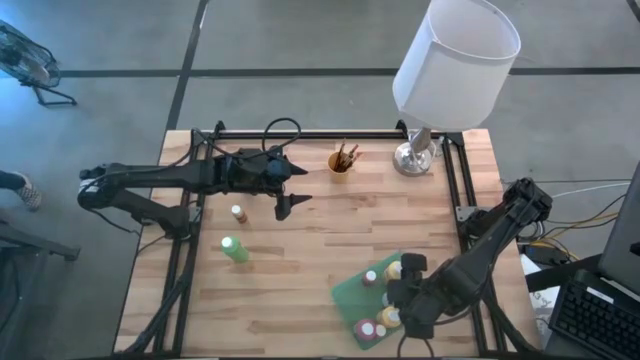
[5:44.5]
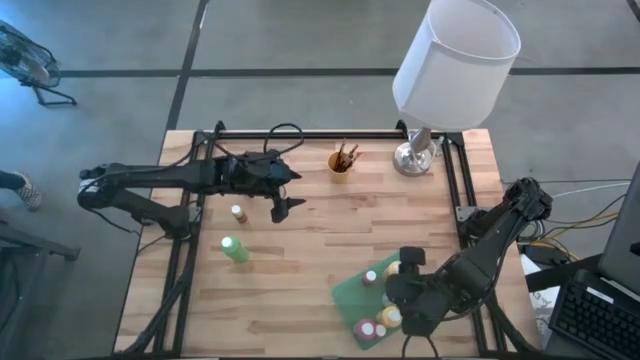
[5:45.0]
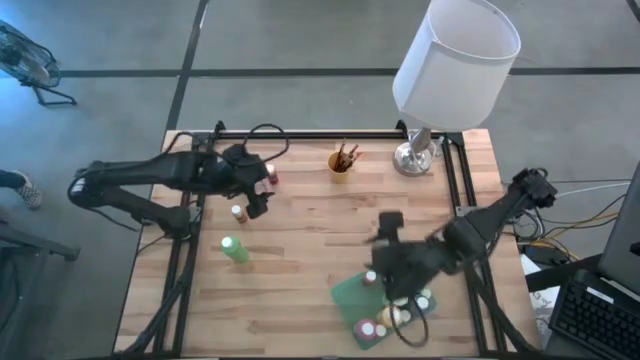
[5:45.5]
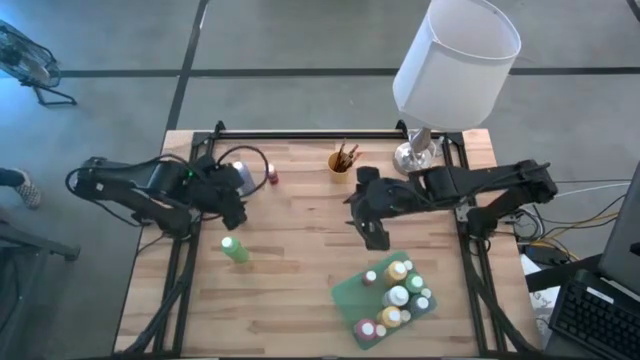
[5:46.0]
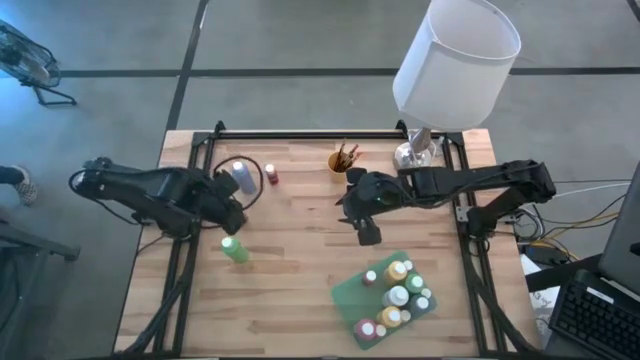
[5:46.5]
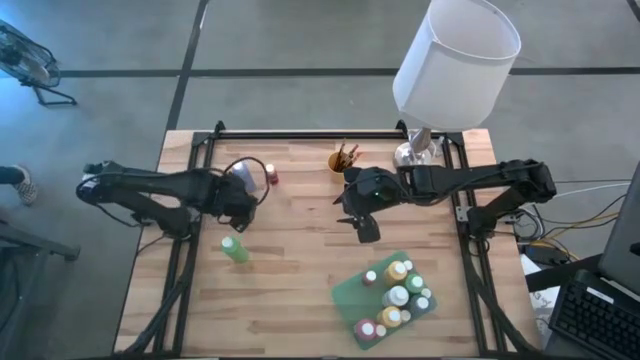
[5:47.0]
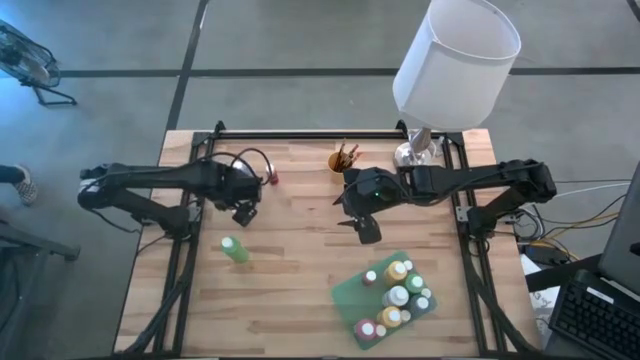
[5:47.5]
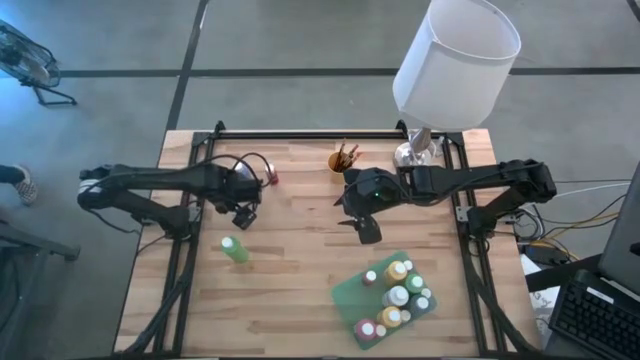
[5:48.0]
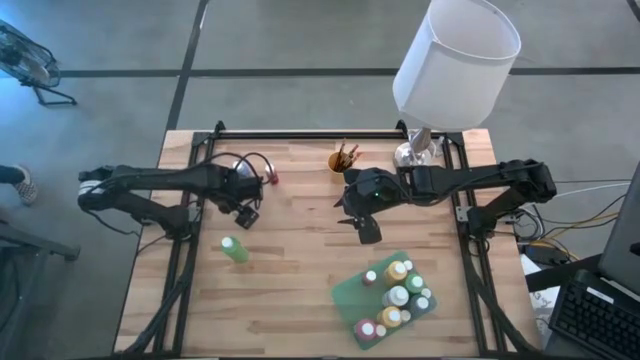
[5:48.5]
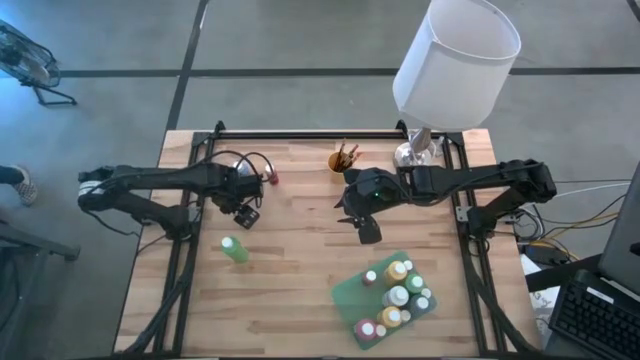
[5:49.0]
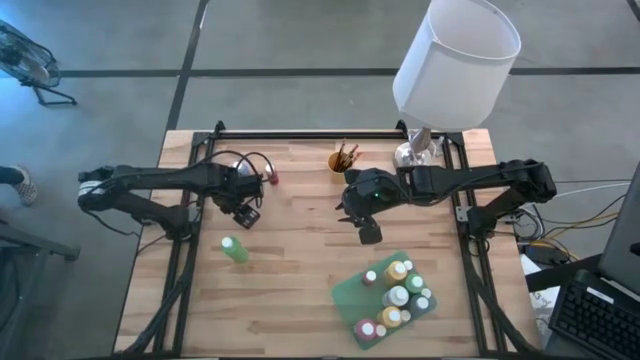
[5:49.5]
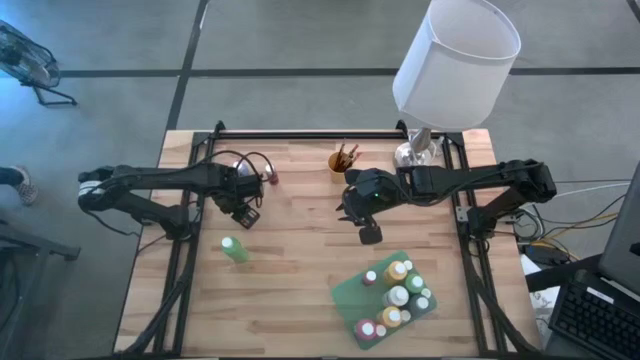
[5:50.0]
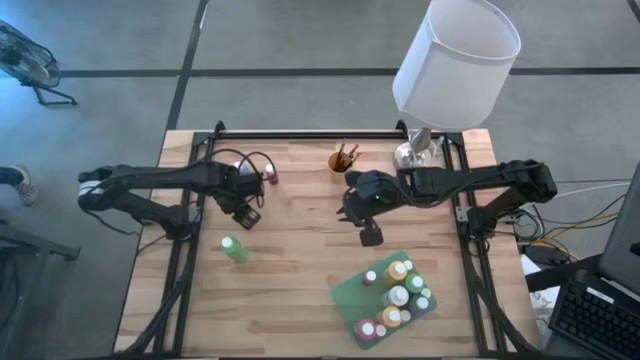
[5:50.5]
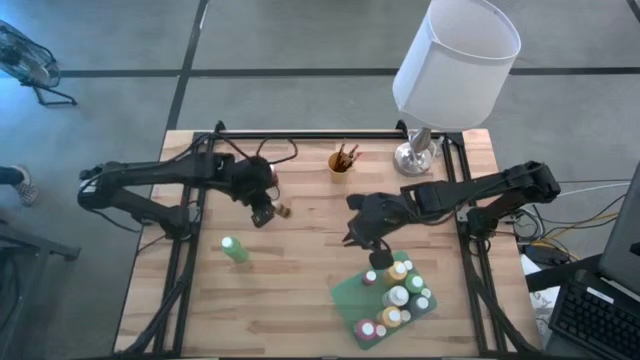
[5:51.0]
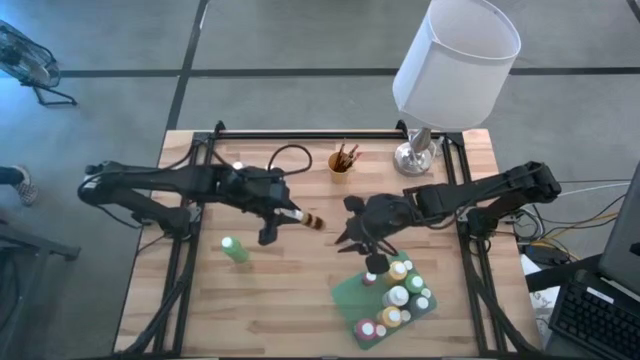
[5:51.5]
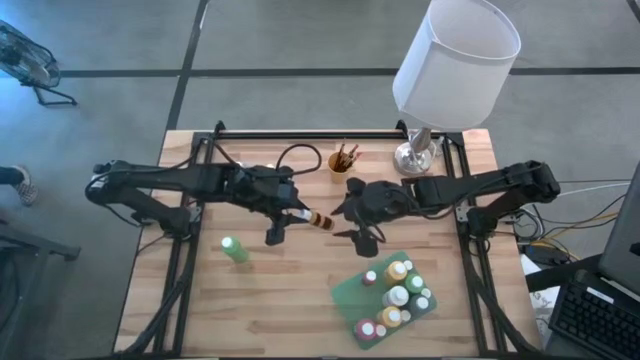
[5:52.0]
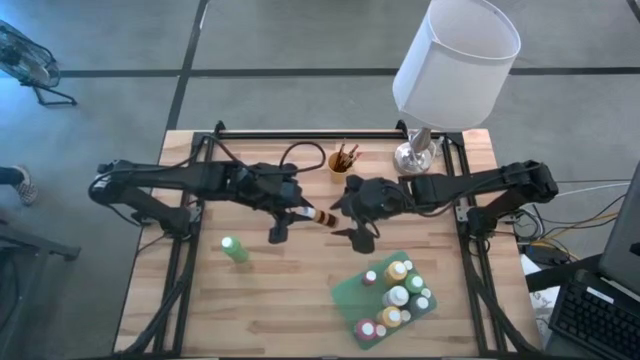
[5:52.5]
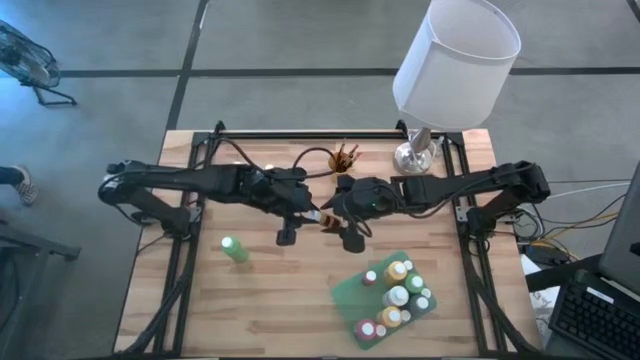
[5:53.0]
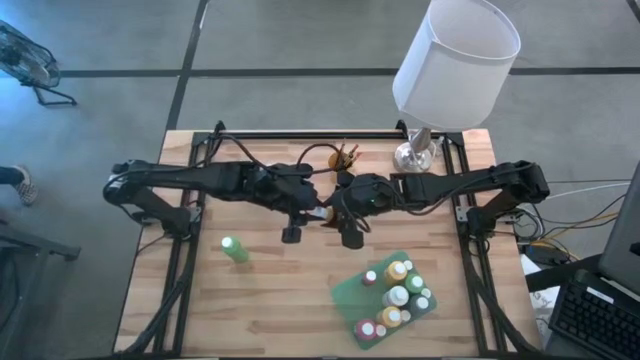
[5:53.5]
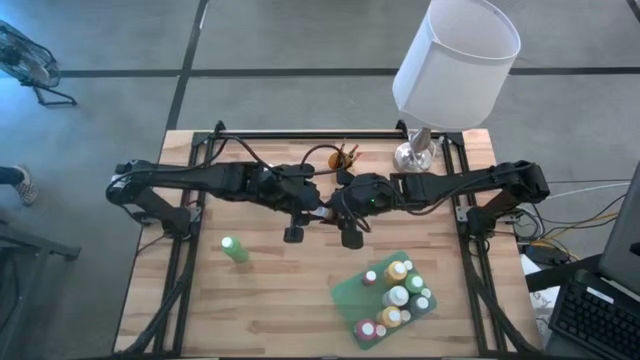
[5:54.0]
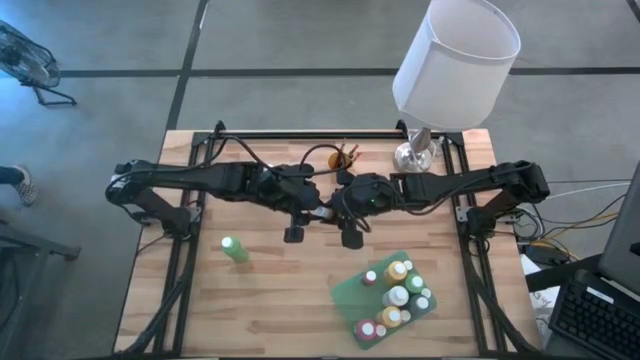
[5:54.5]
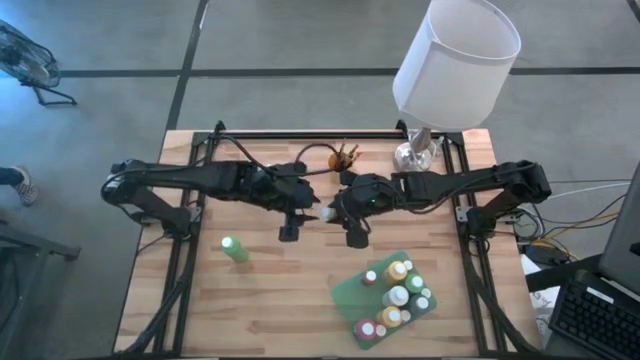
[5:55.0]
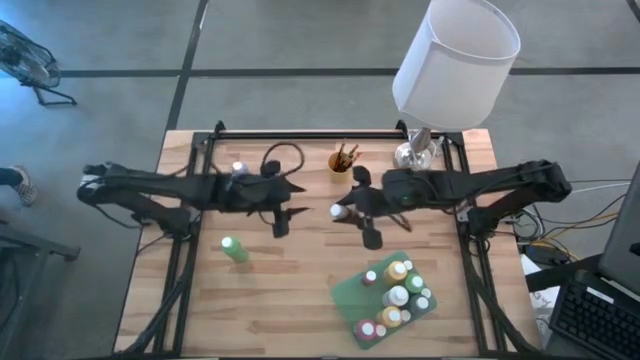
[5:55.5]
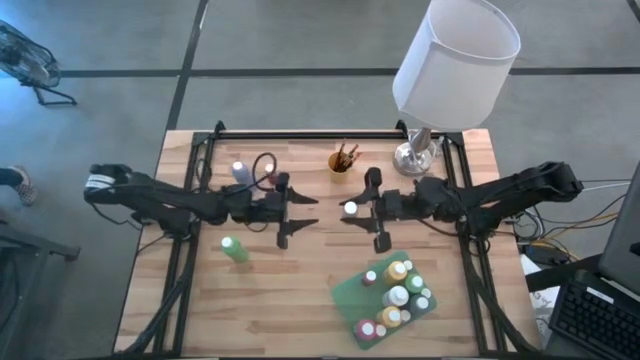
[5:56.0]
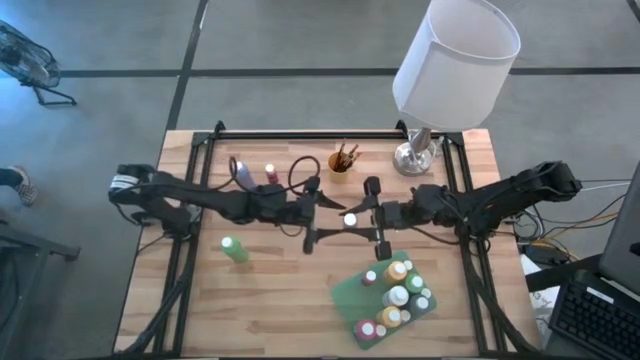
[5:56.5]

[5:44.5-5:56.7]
Task: Pick & Place Paint Supplies
Put the light green into the green bin

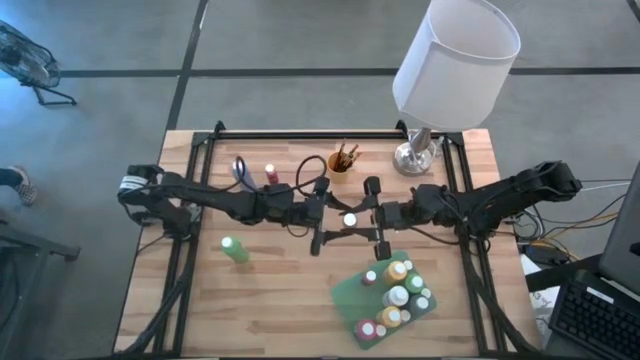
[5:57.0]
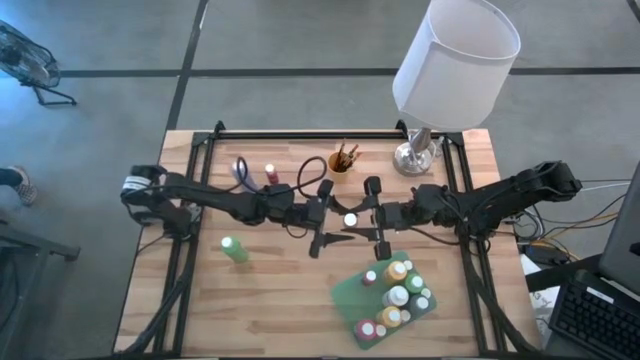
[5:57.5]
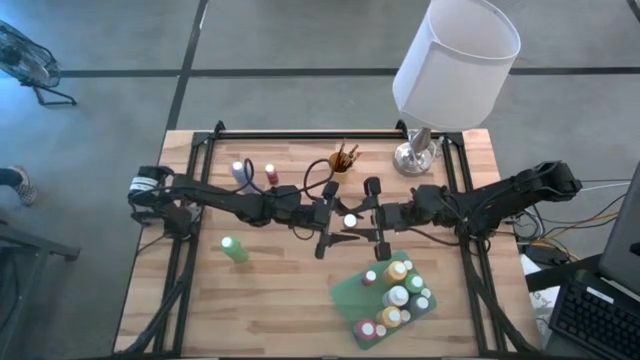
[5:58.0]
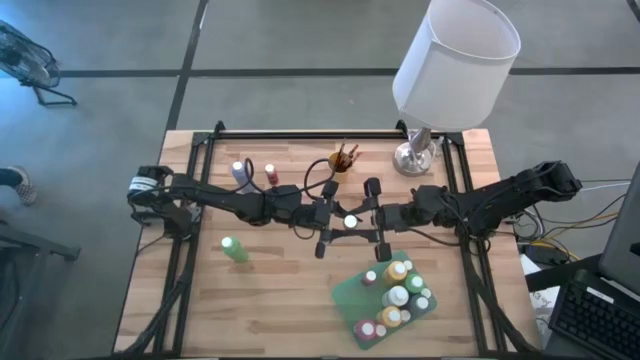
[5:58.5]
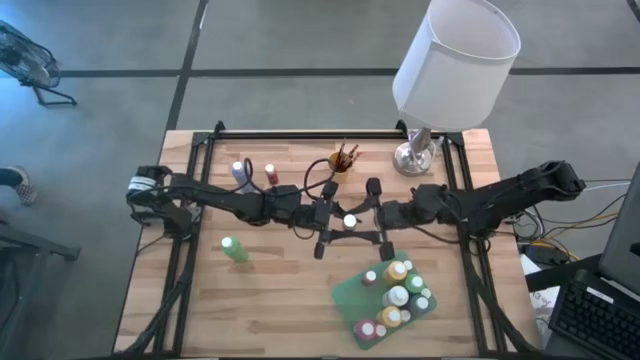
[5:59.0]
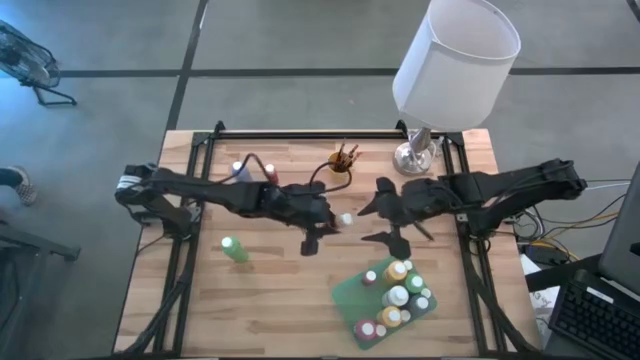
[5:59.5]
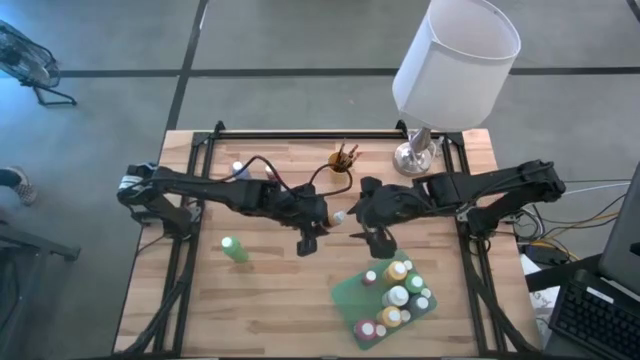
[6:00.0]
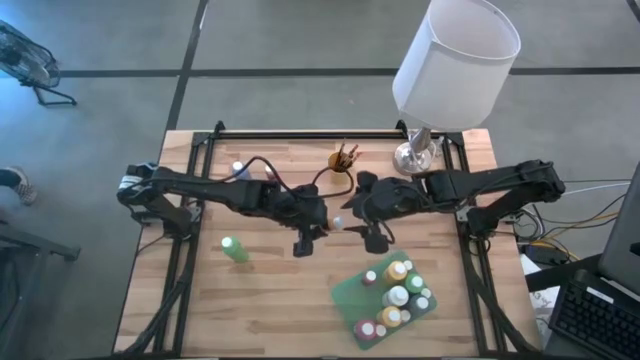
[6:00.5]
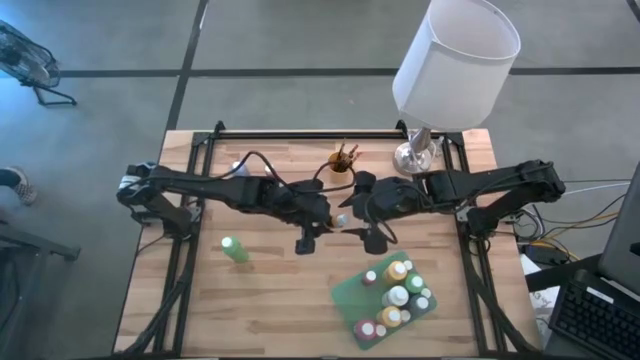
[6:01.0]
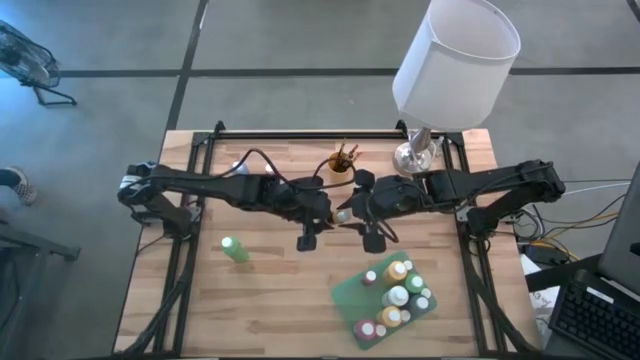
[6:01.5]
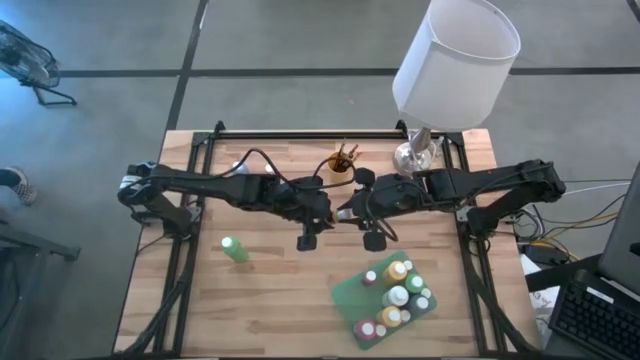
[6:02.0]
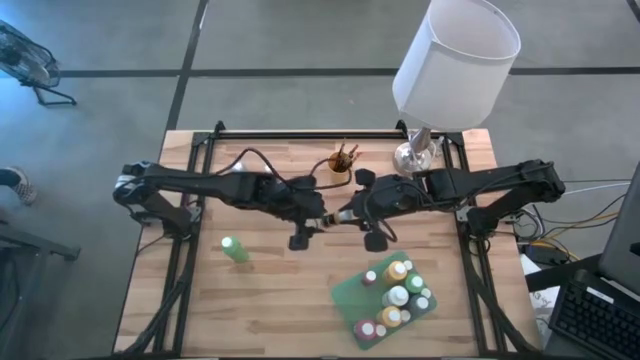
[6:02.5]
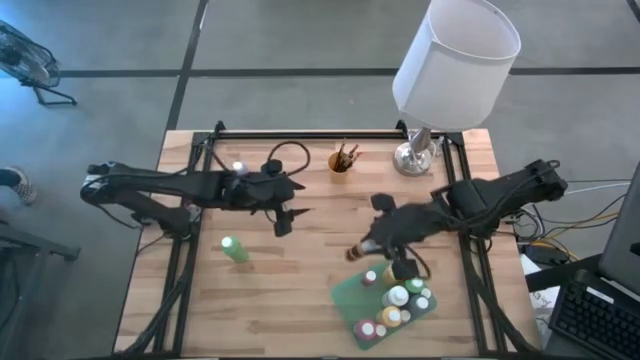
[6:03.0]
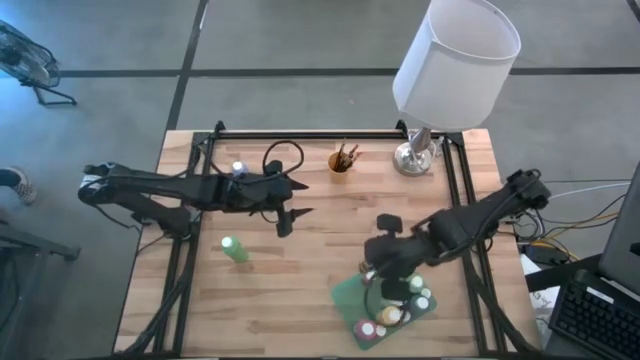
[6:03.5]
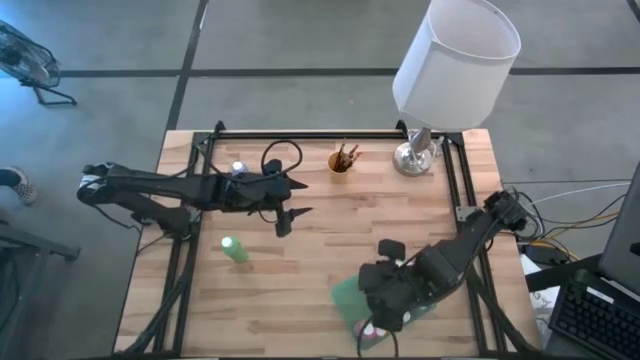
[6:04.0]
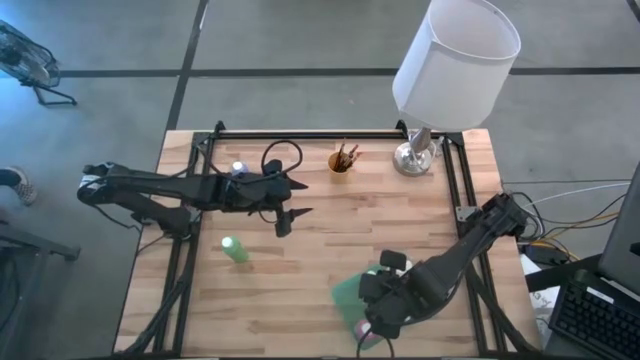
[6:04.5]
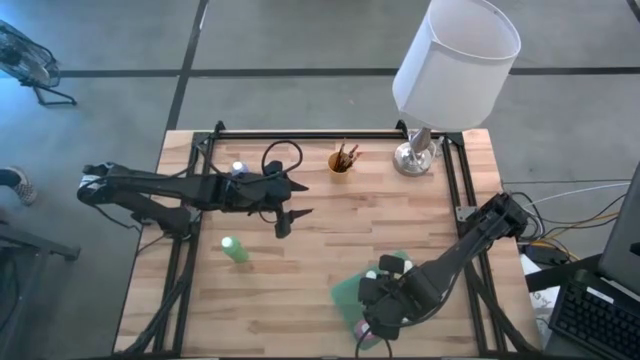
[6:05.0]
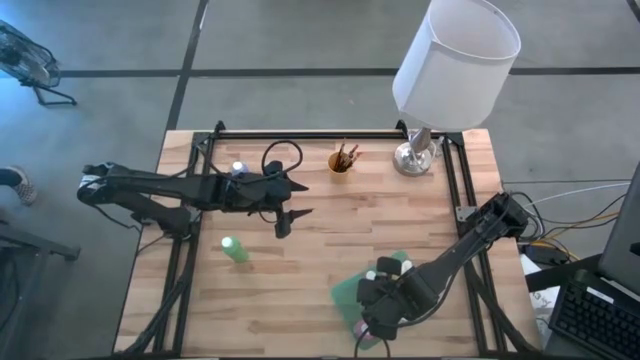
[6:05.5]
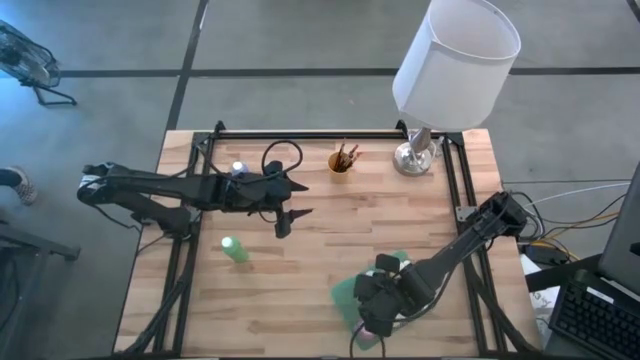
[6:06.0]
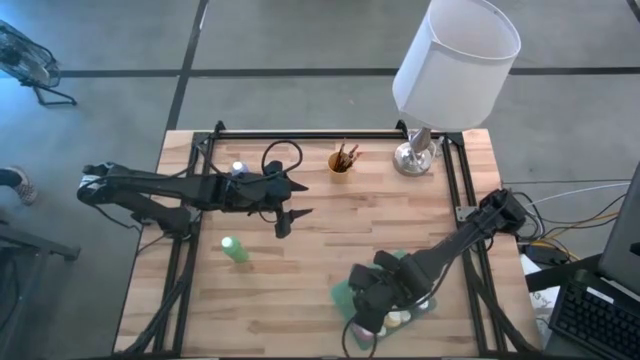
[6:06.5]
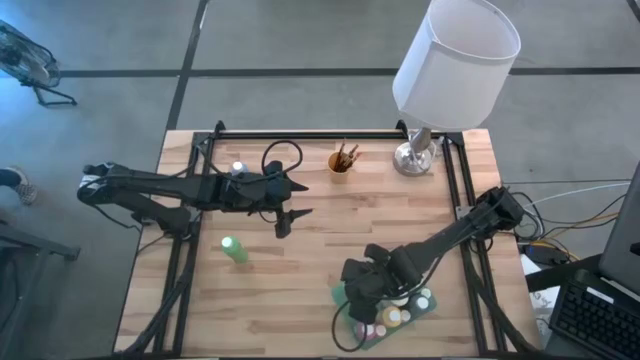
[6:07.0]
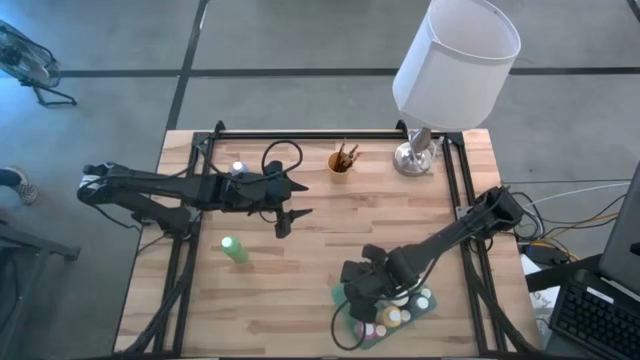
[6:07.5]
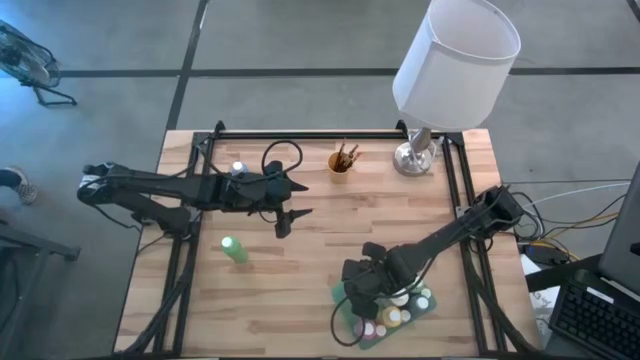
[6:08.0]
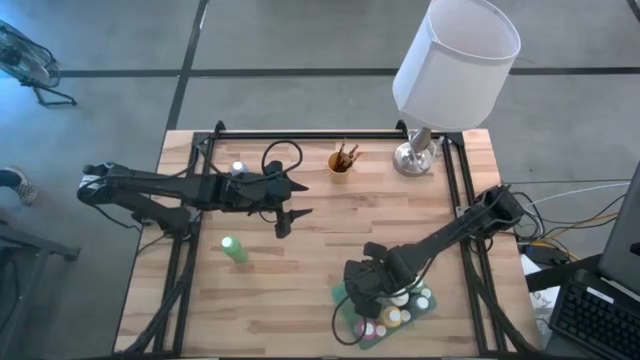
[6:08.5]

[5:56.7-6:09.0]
Put the light green into the green bin
